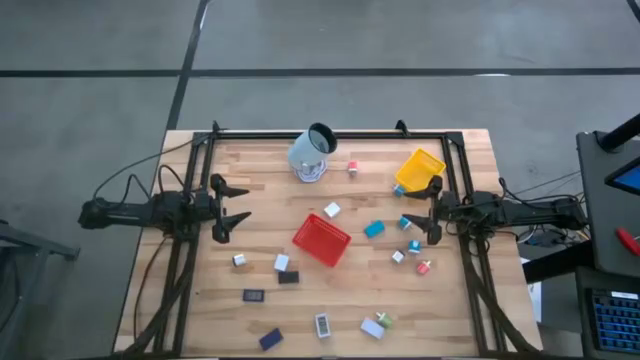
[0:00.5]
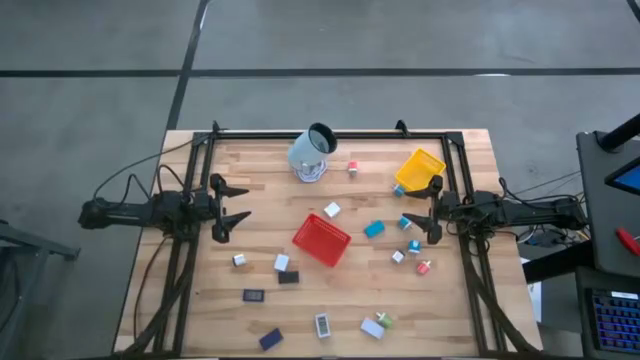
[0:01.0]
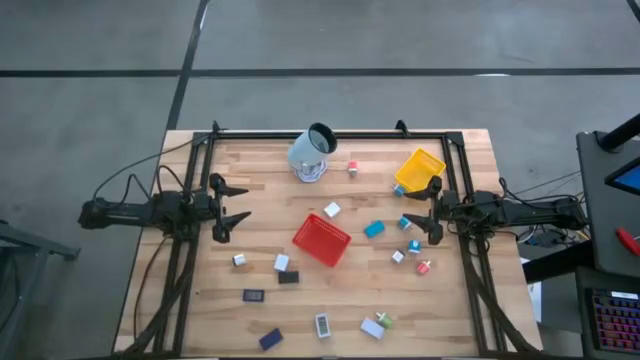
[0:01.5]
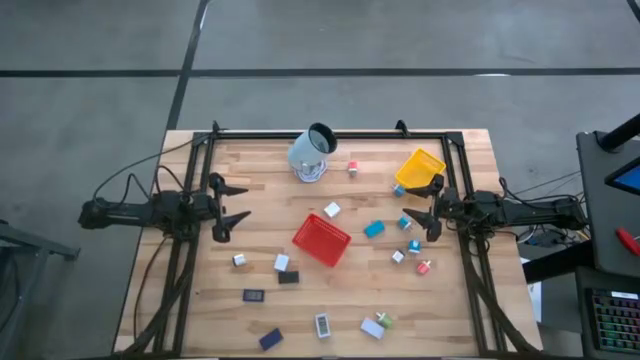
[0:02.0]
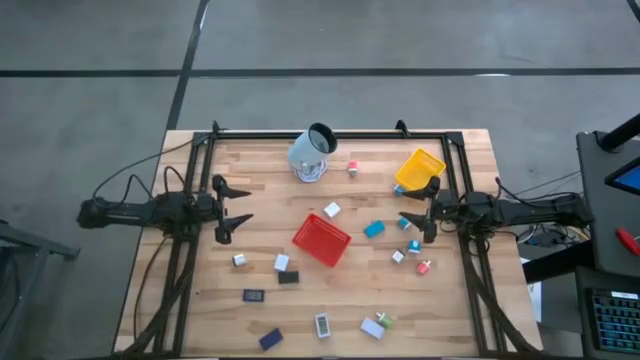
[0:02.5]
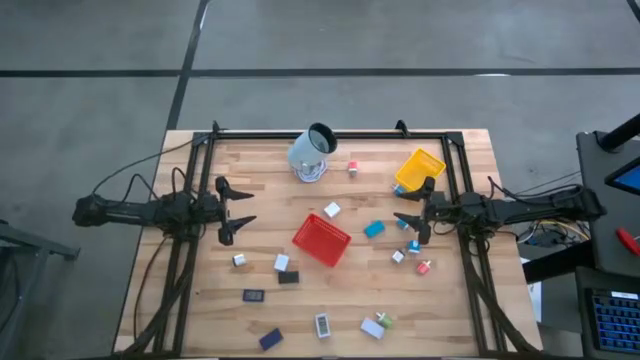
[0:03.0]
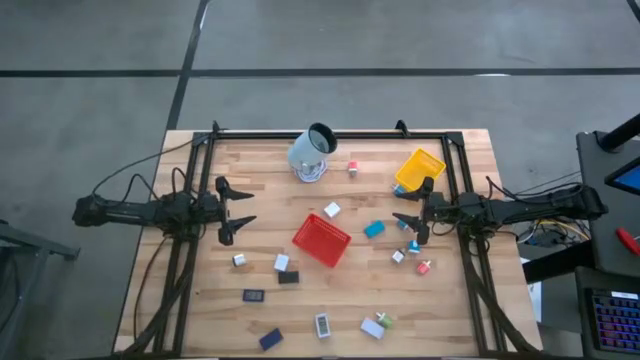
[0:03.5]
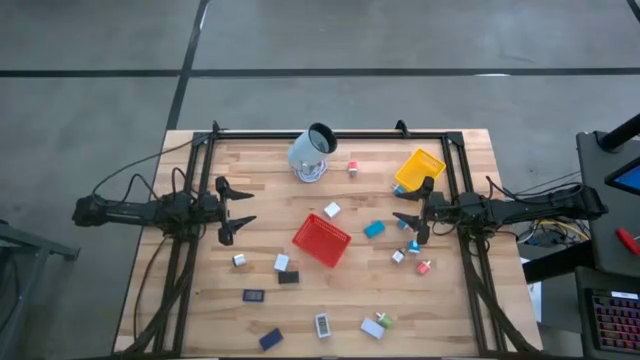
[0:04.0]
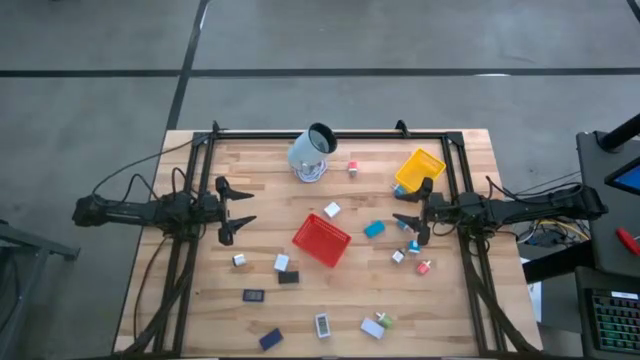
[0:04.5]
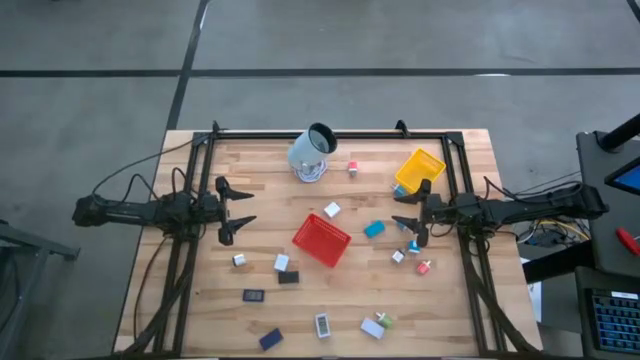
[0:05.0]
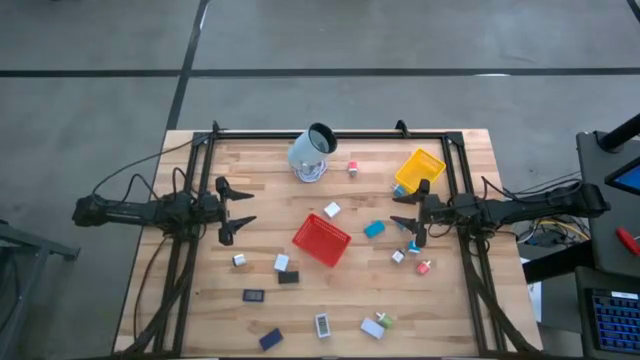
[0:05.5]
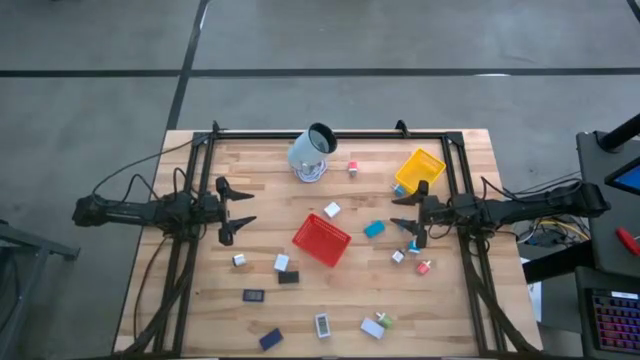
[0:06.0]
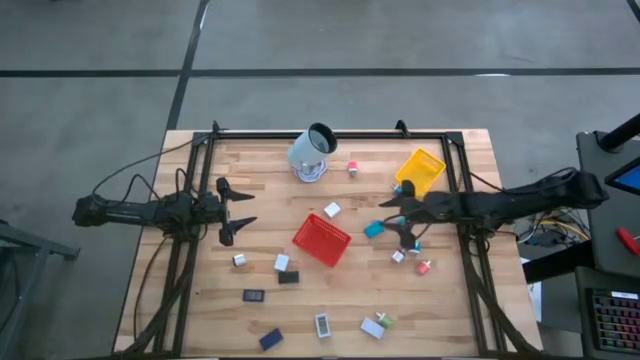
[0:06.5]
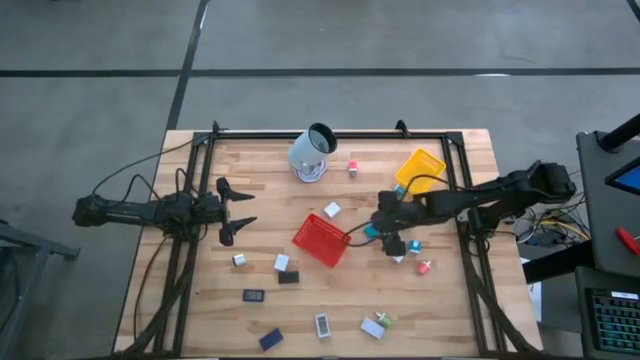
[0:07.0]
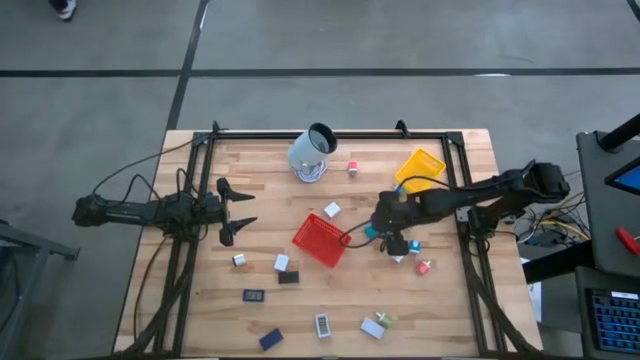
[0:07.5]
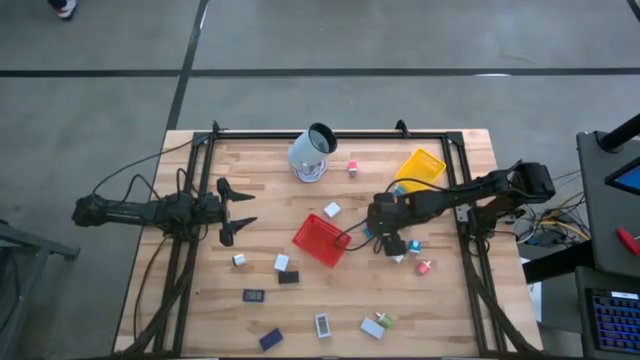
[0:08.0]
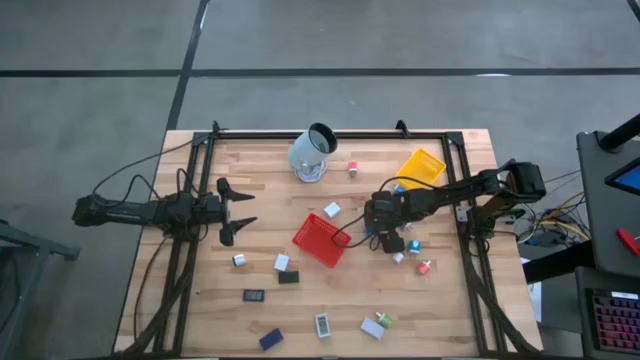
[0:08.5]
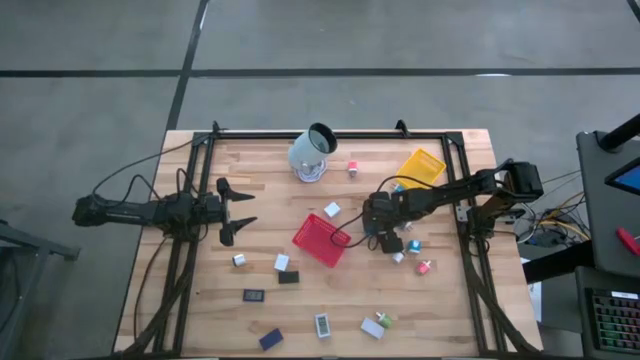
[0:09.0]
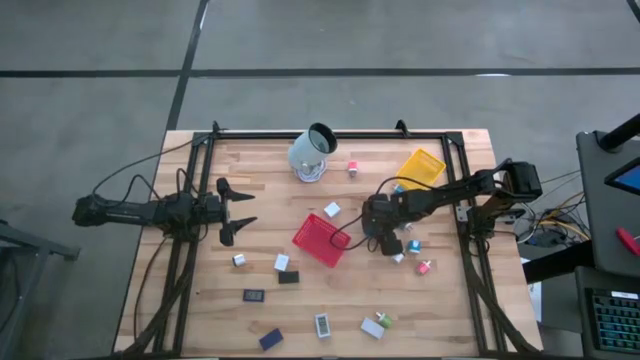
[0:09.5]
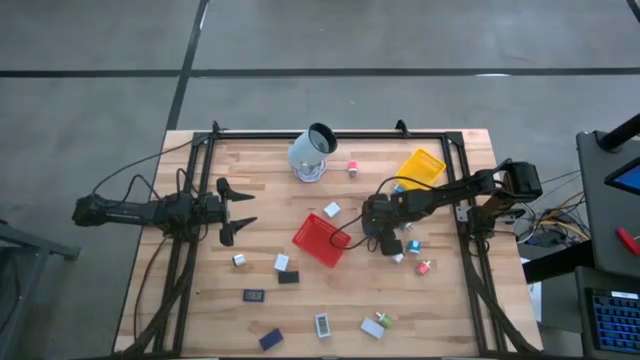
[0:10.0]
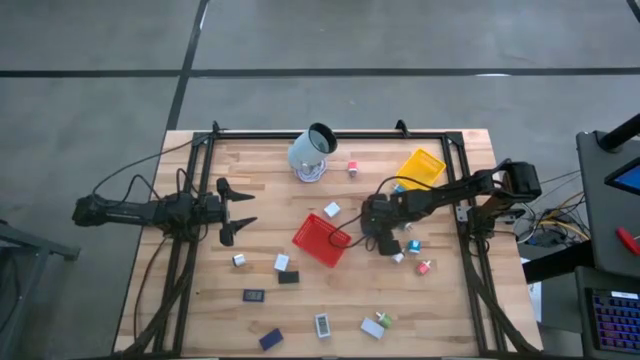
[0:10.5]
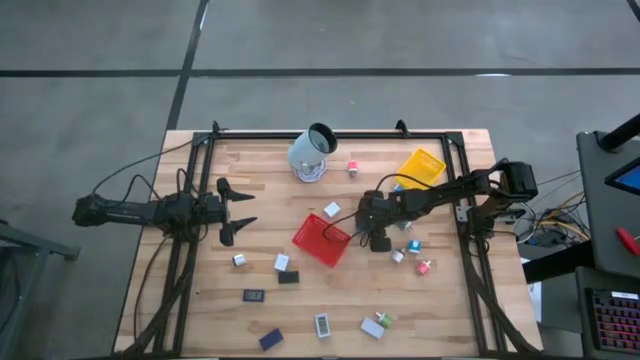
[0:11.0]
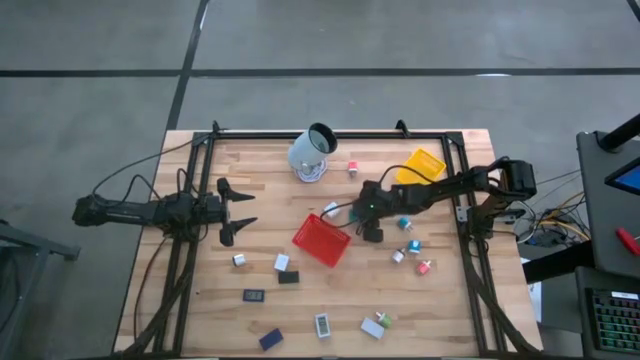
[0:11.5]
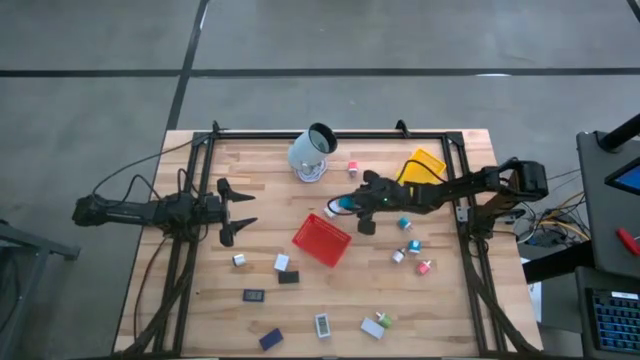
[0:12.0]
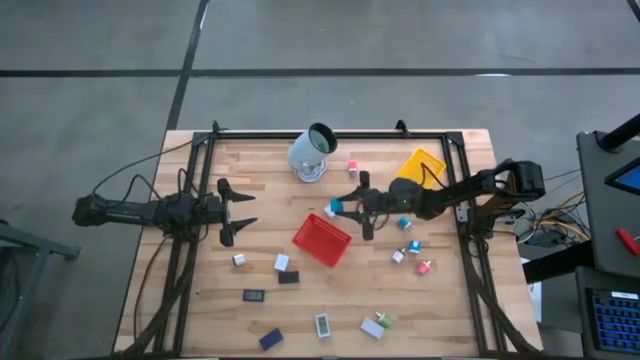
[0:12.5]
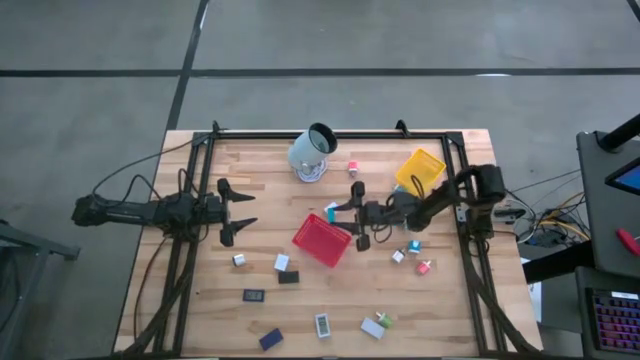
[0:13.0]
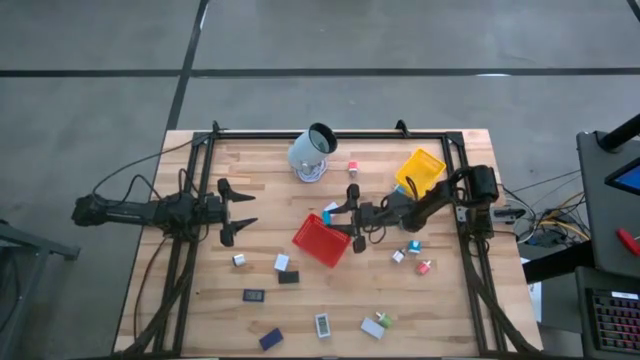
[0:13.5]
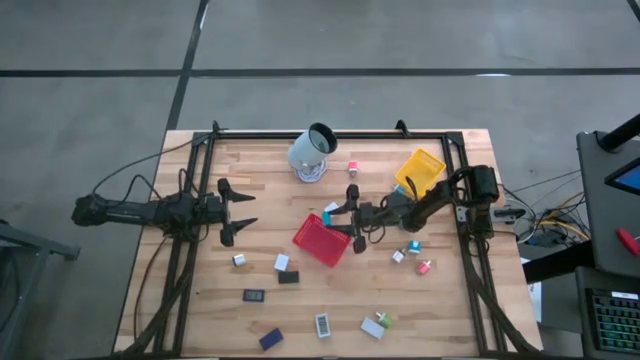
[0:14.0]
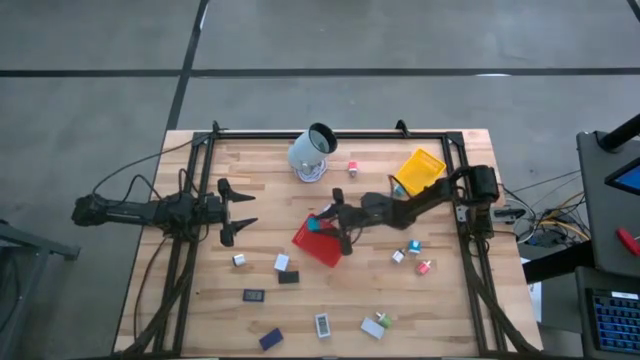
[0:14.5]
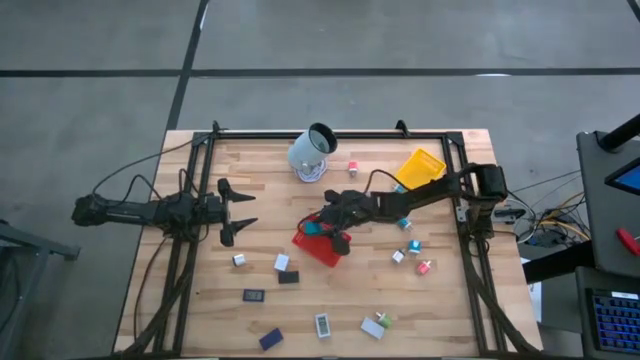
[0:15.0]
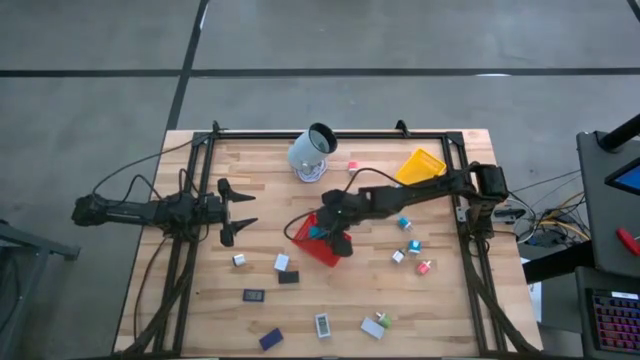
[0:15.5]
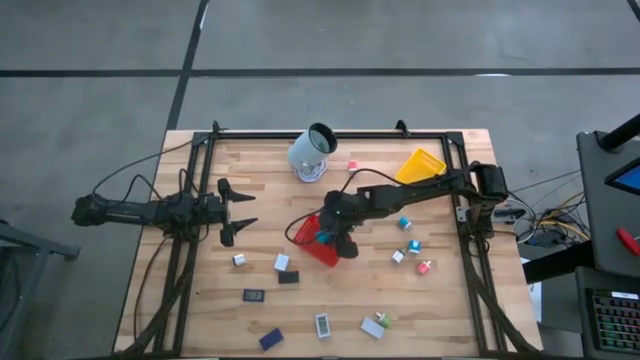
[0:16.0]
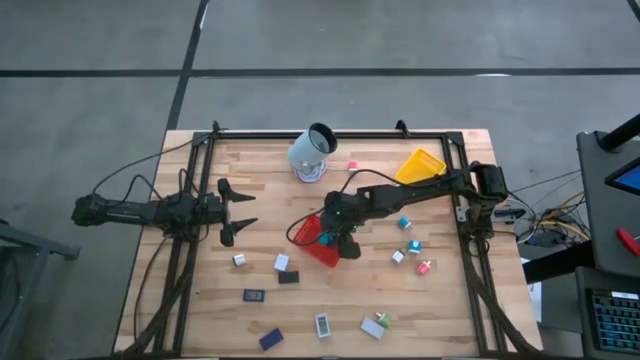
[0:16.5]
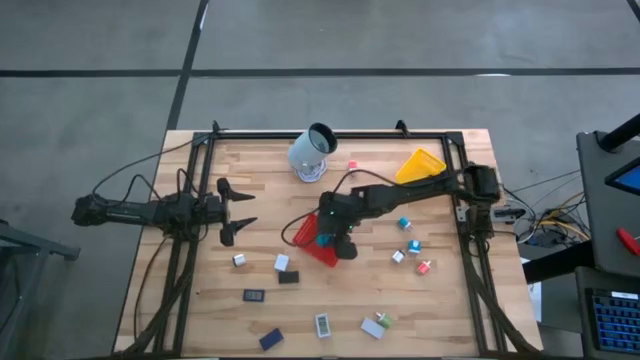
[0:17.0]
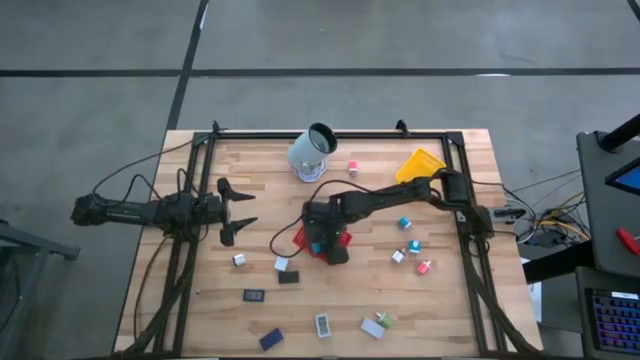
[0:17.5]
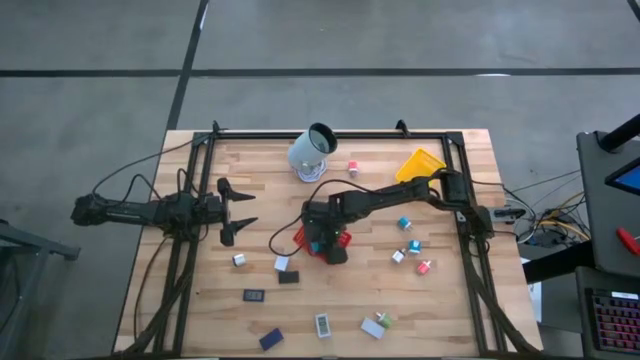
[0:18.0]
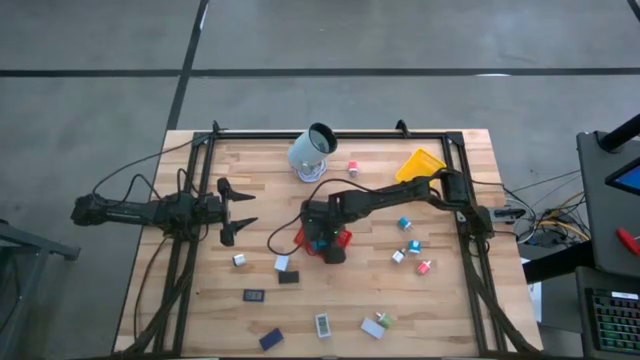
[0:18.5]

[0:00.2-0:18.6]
Task: Pick & Place Office items
Put the light blue digital clock into the red basket
